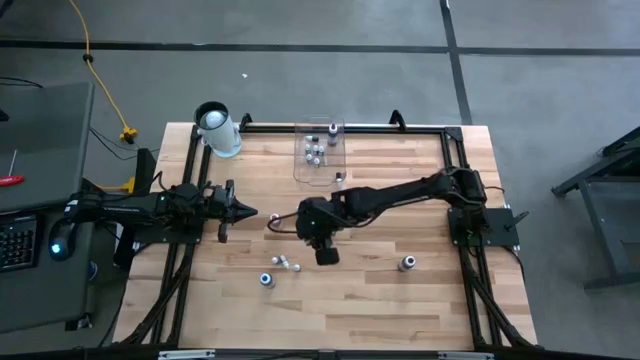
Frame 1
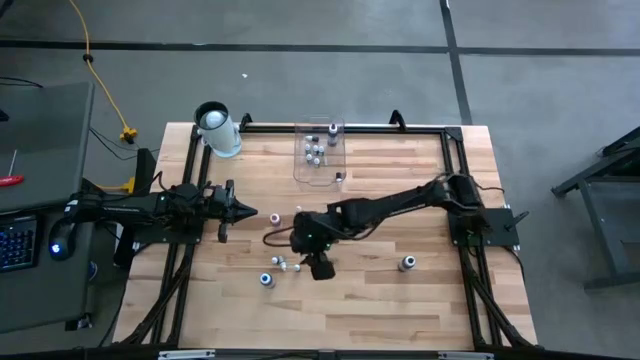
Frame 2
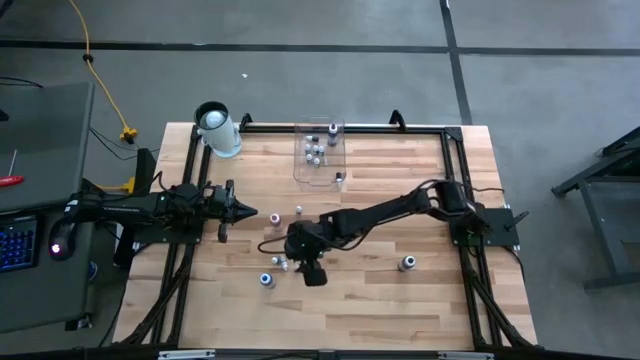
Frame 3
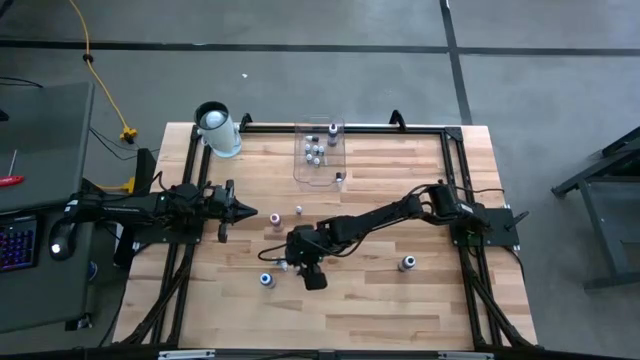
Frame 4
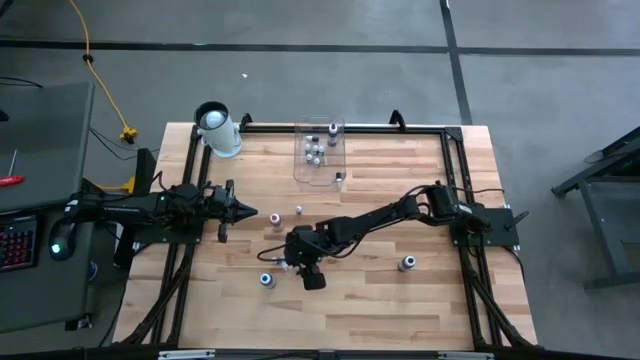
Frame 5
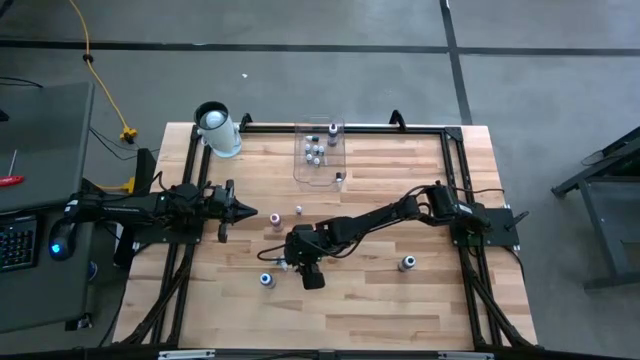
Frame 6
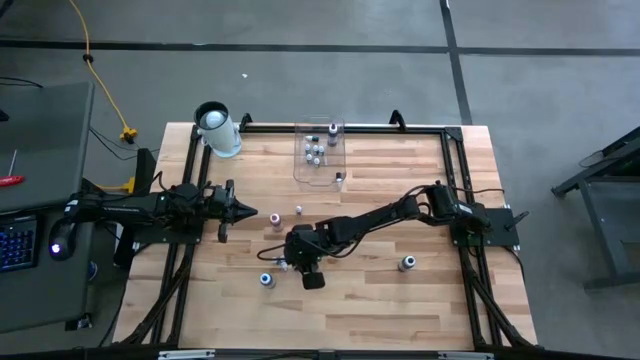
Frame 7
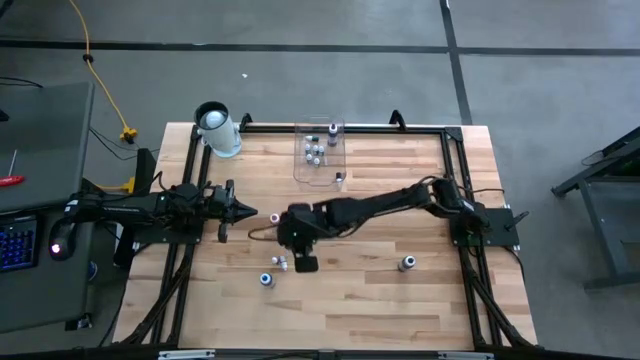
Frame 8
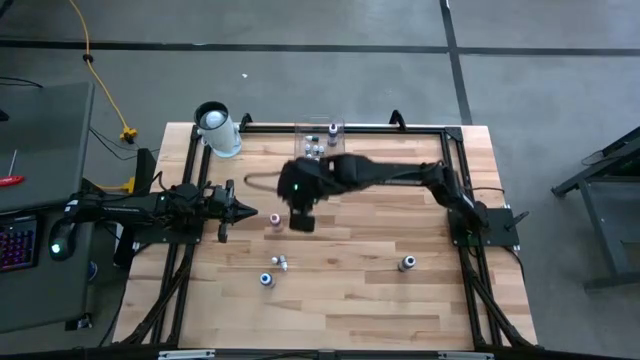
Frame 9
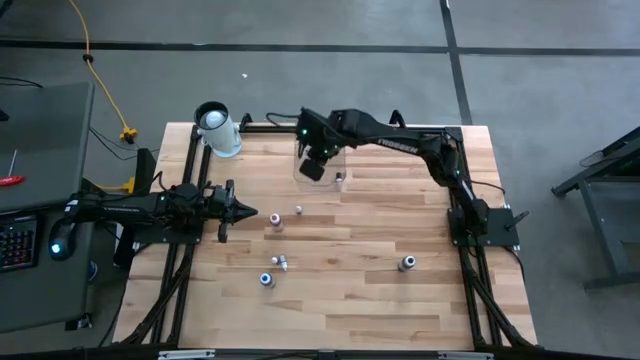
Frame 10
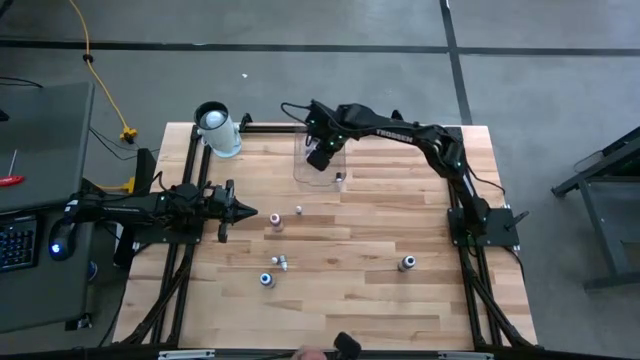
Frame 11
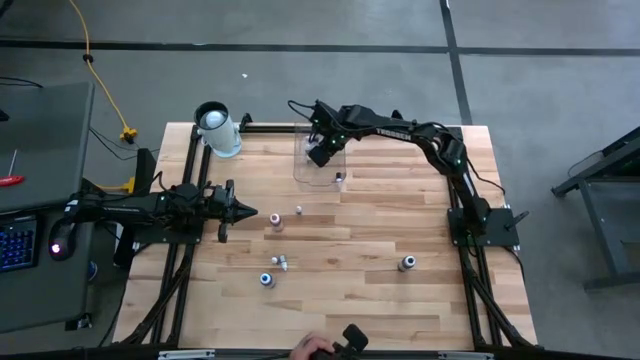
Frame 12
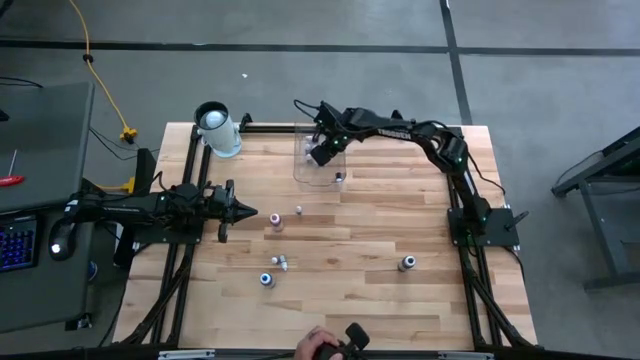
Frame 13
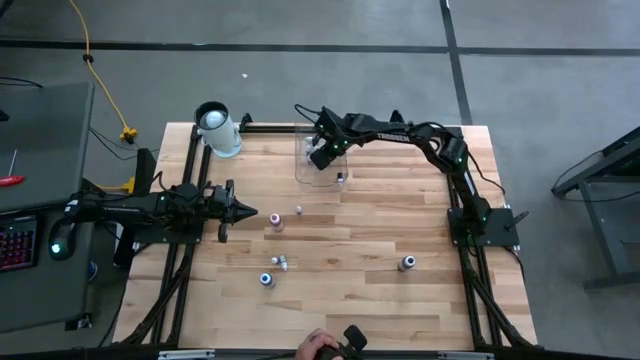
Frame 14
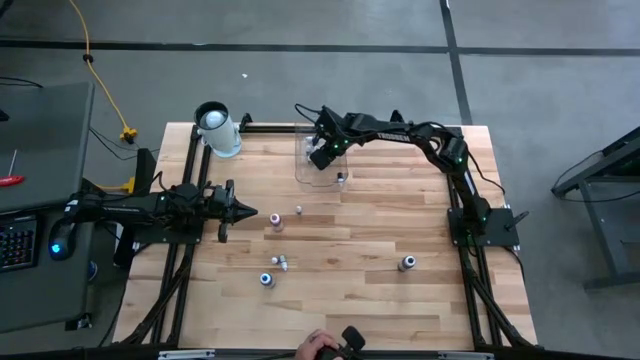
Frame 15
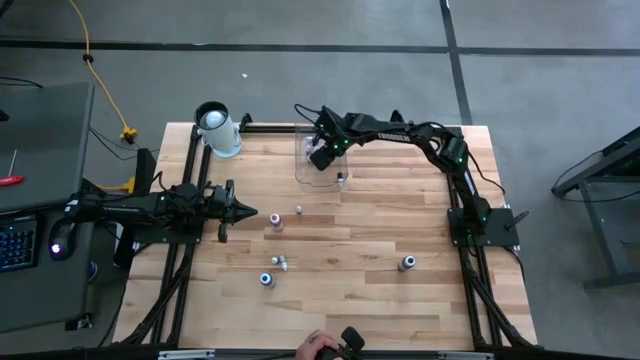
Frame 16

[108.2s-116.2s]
Task: Pick & Place food coloring
Put the small blue food coloring bottle into the container

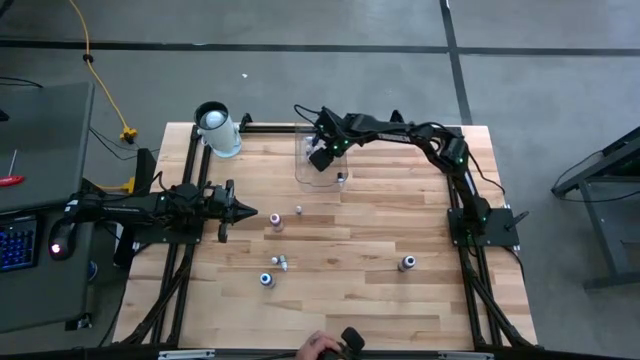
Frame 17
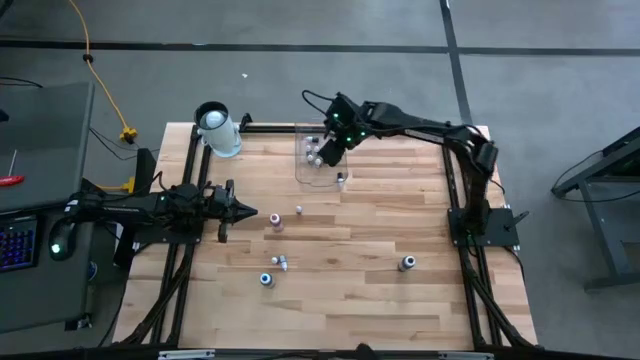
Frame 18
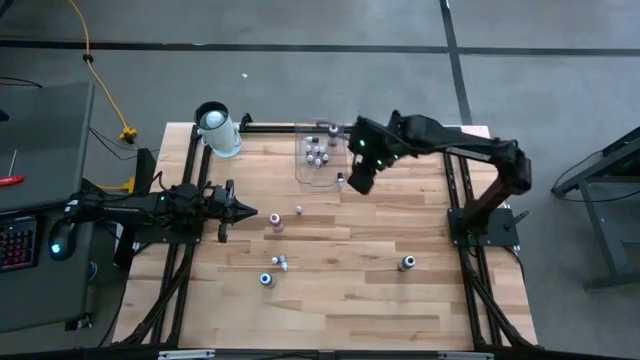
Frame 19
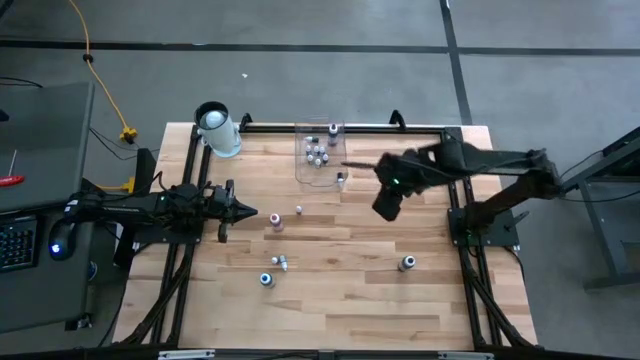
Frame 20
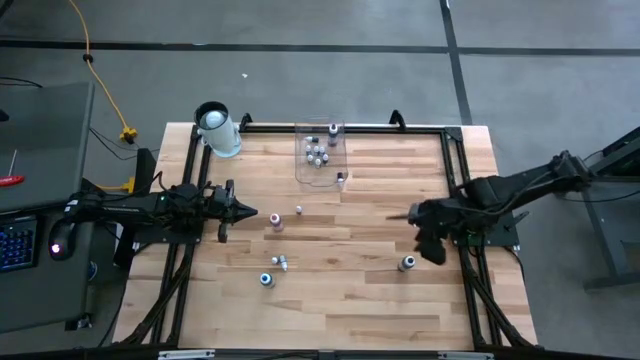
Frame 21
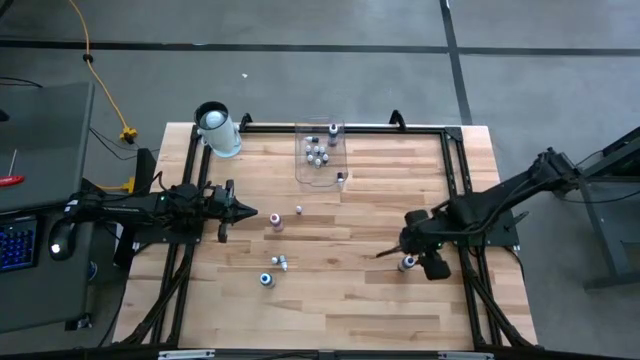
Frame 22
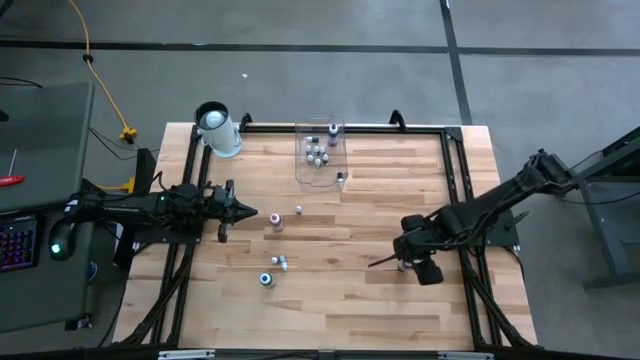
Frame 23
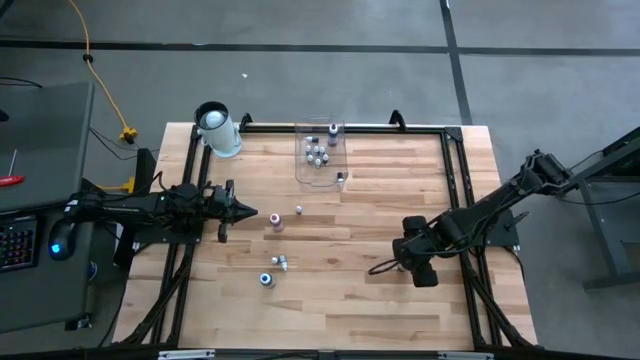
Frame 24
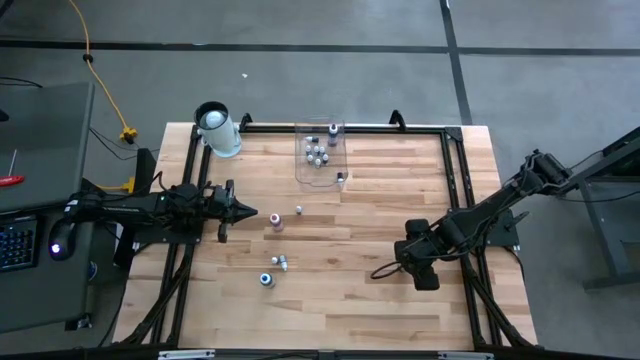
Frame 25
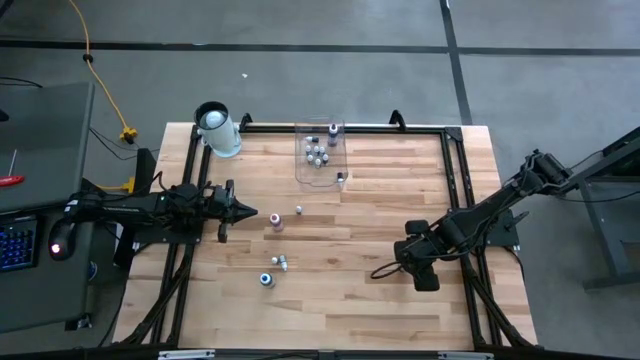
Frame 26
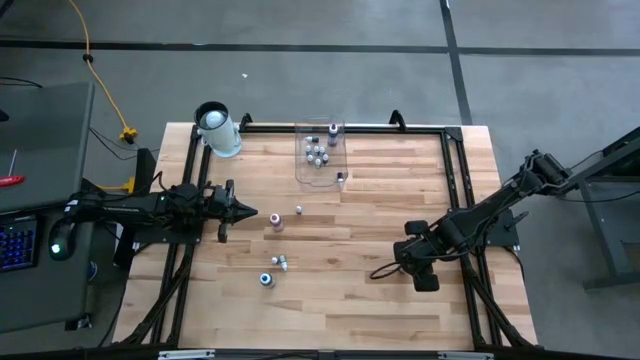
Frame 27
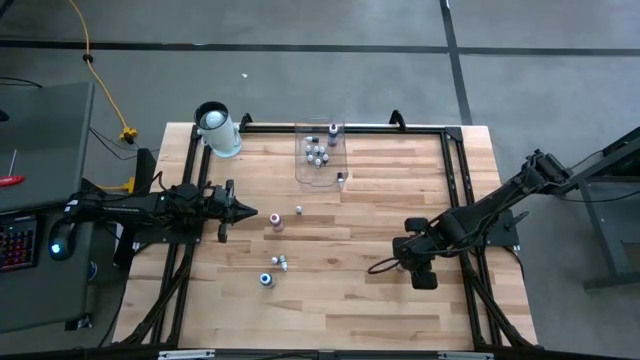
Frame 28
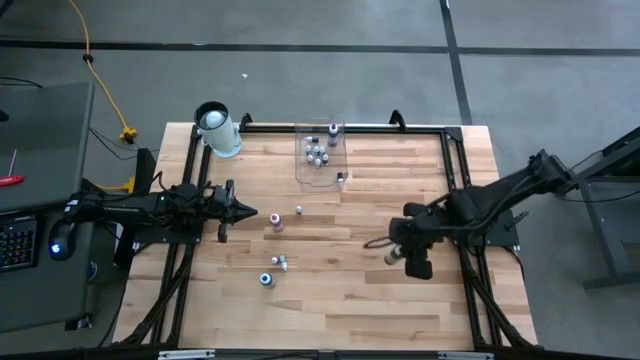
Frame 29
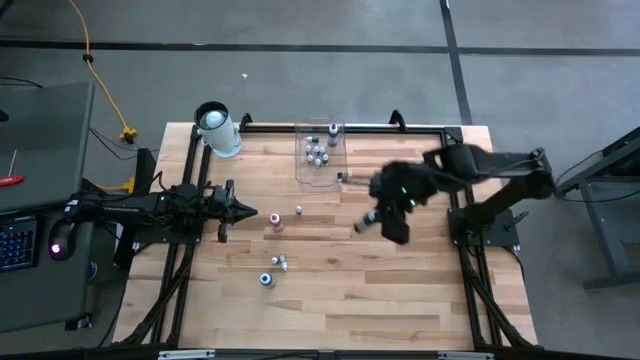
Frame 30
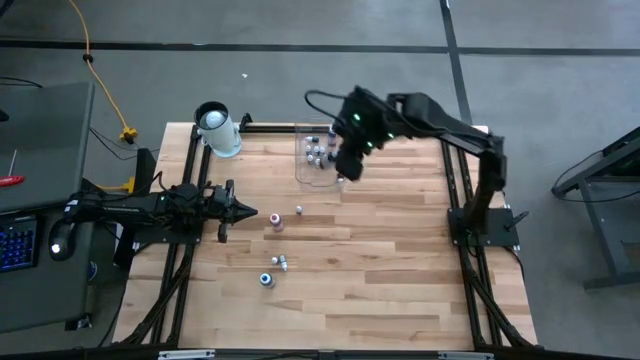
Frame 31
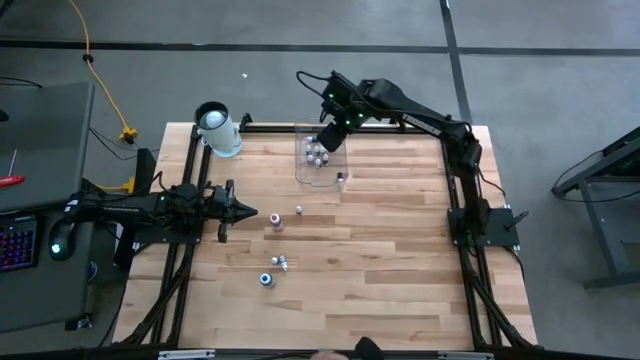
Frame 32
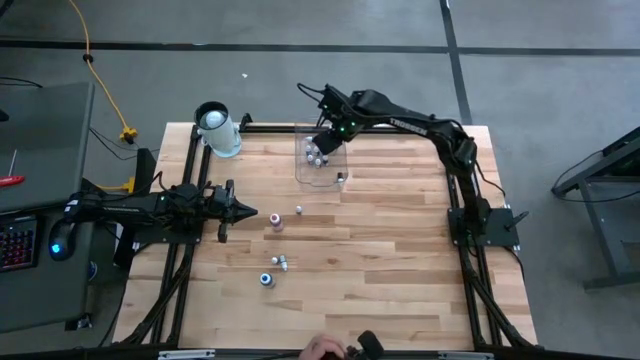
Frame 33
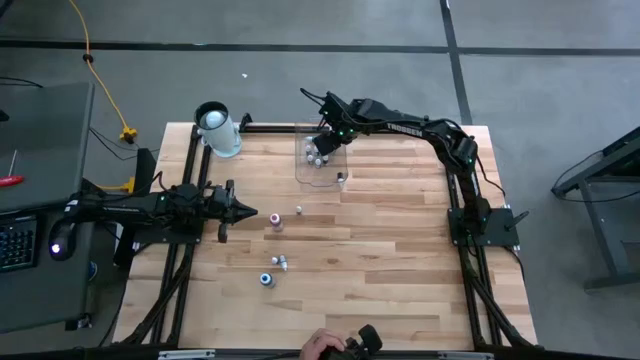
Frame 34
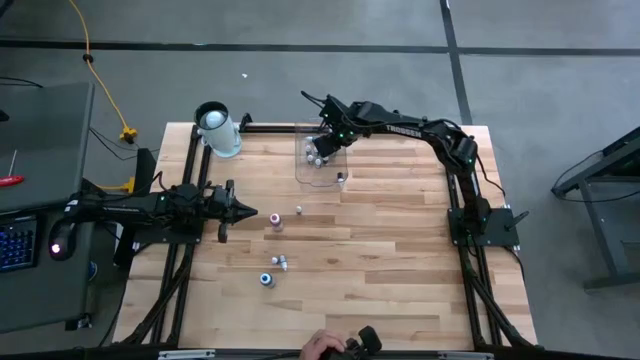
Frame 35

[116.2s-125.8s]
Put the large black food coloring bottle into the container

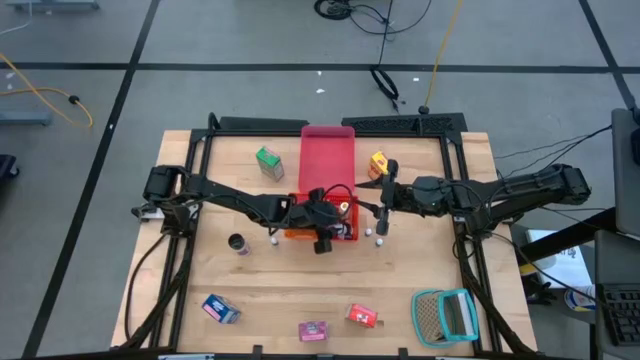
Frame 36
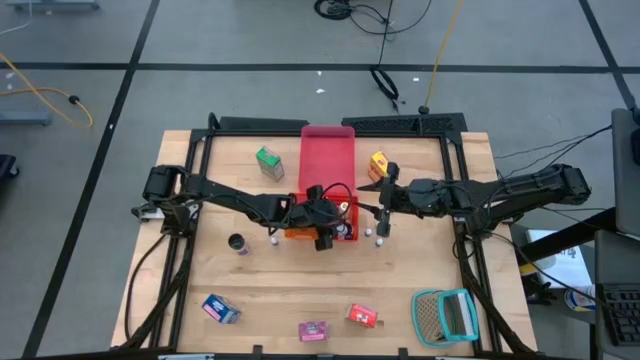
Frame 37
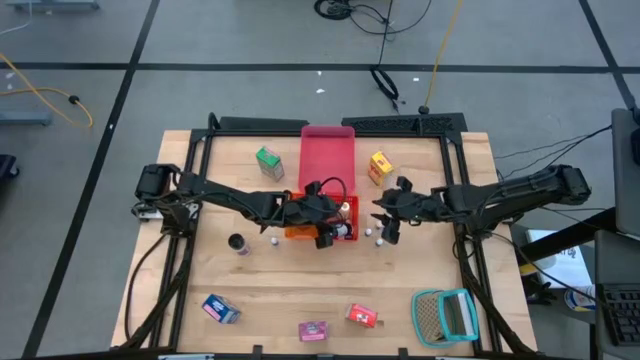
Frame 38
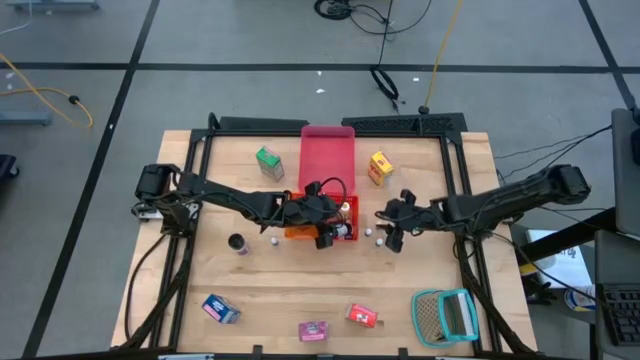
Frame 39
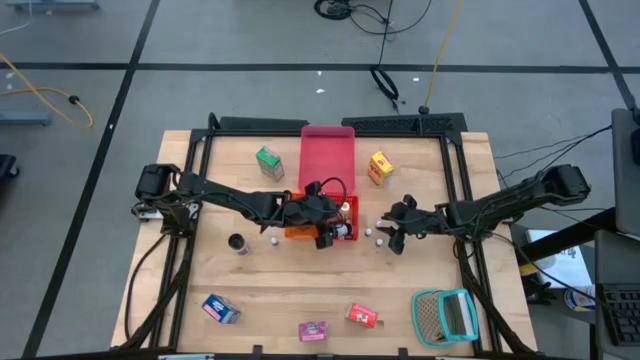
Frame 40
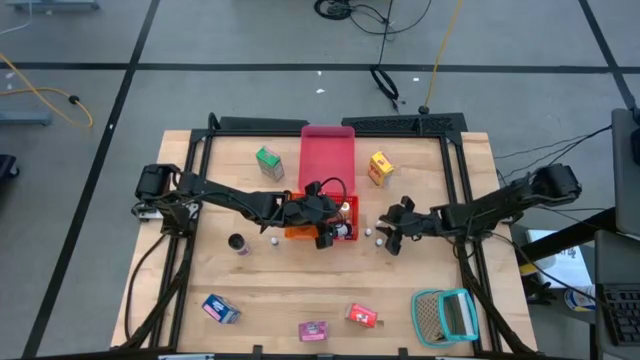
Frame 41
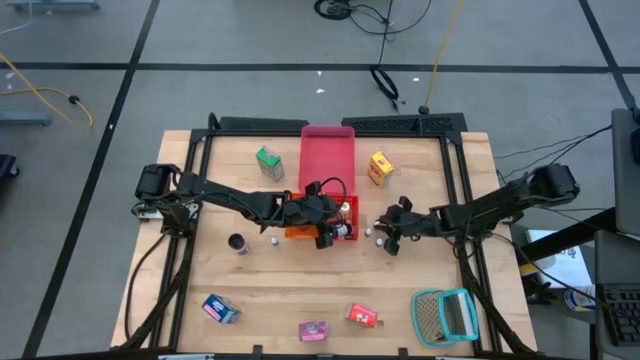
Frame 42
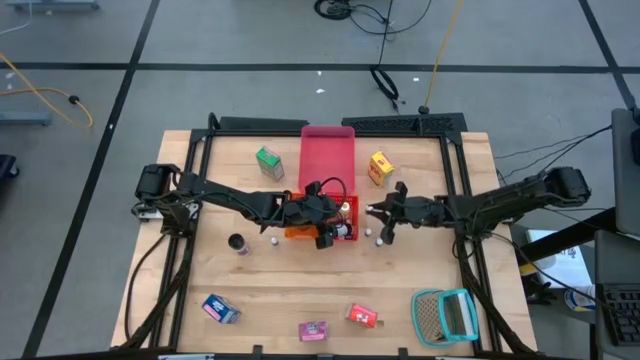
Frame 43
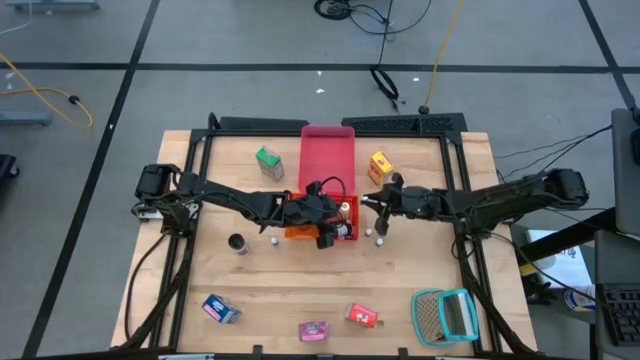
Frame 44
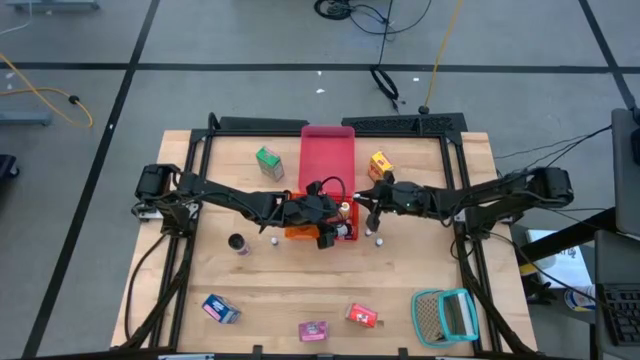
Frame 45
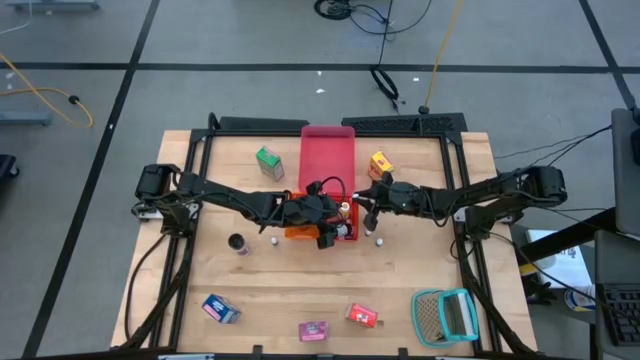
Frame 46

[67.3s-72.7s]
Task: Pick & Place Kitchen Items
Put the small red food coloring bottle into the red basket
